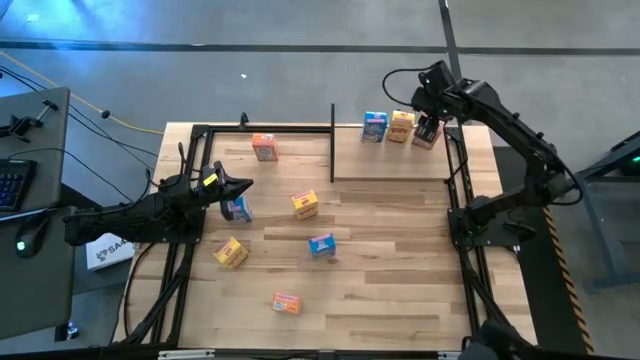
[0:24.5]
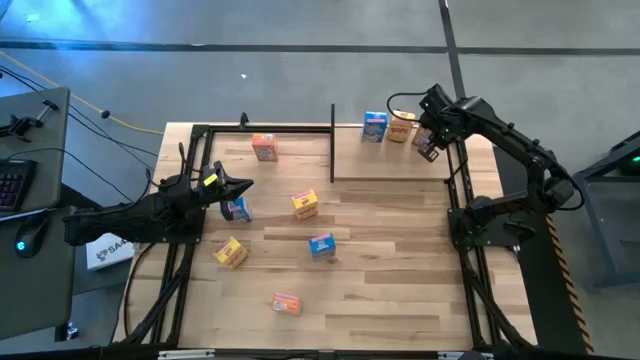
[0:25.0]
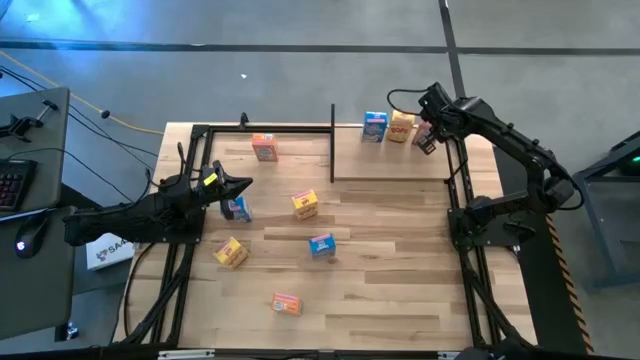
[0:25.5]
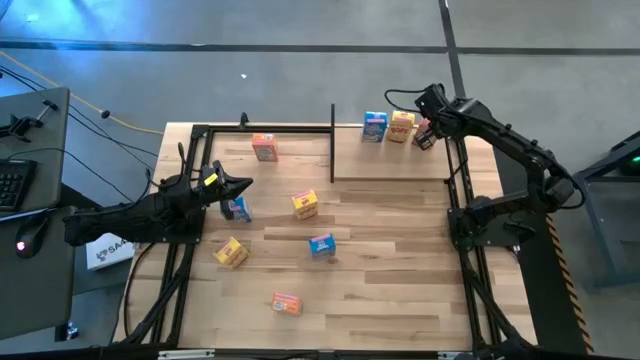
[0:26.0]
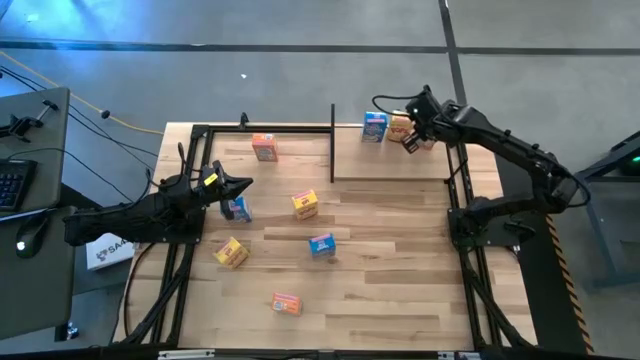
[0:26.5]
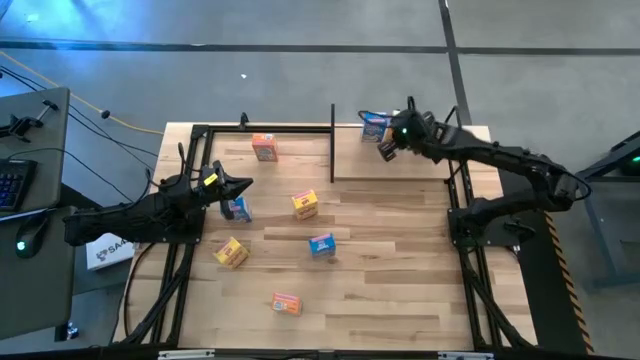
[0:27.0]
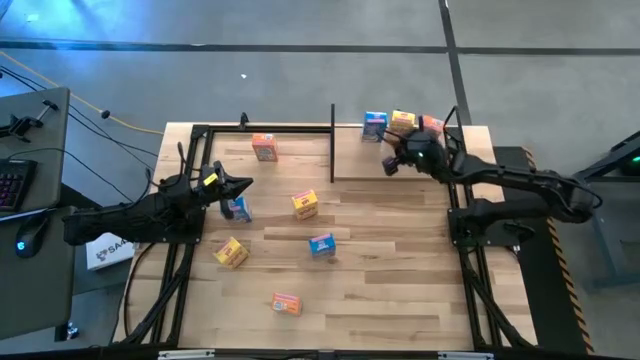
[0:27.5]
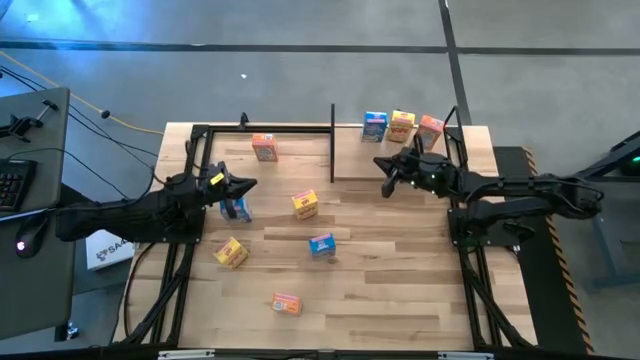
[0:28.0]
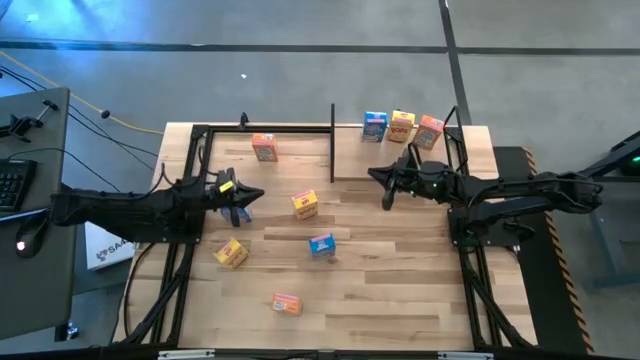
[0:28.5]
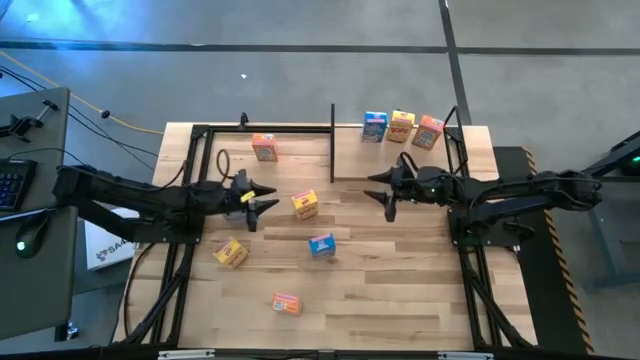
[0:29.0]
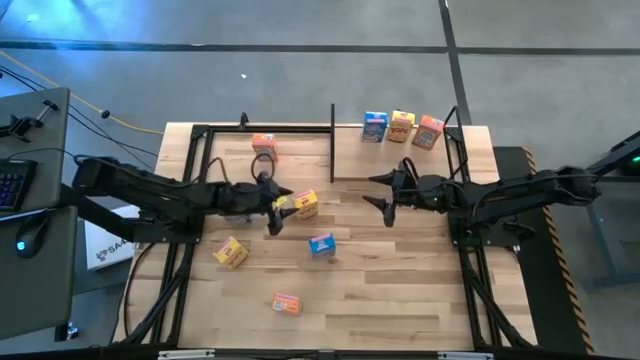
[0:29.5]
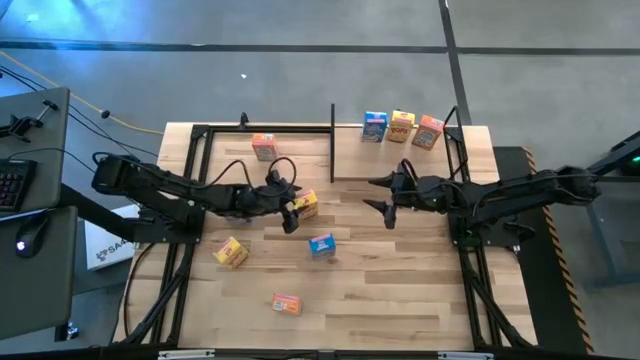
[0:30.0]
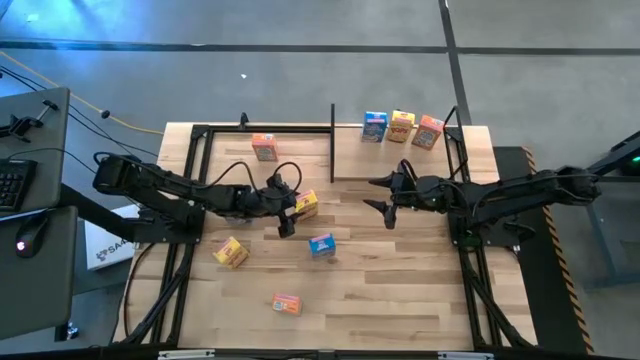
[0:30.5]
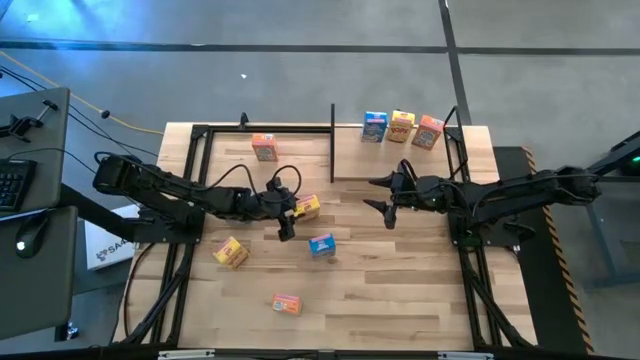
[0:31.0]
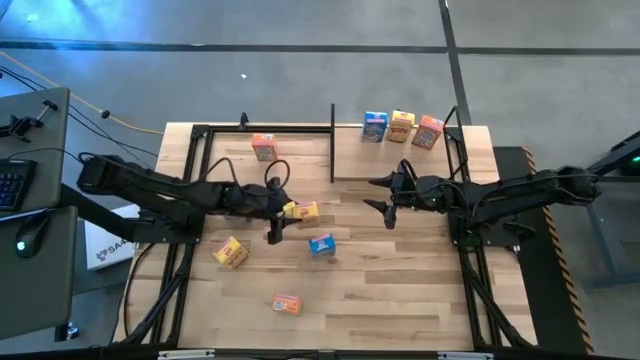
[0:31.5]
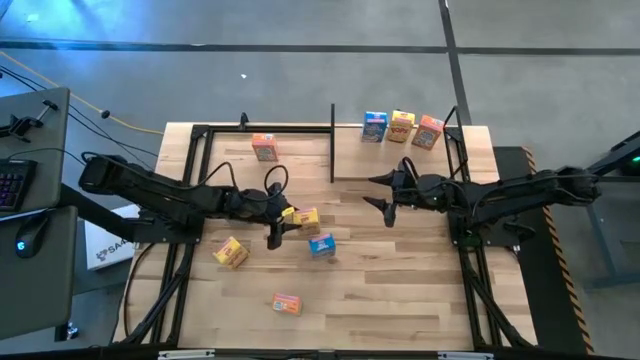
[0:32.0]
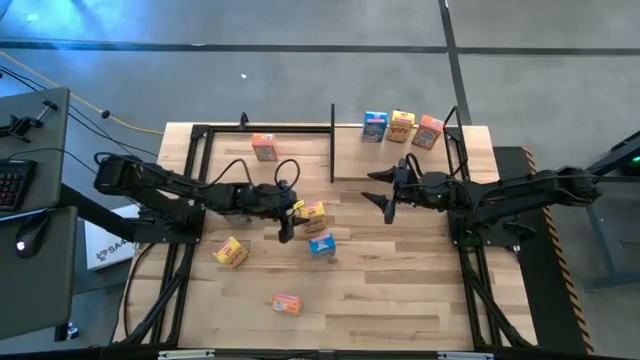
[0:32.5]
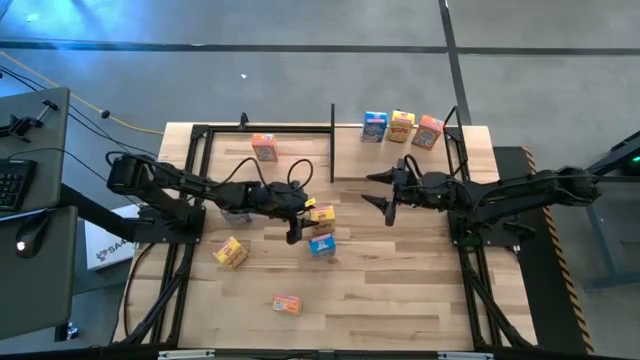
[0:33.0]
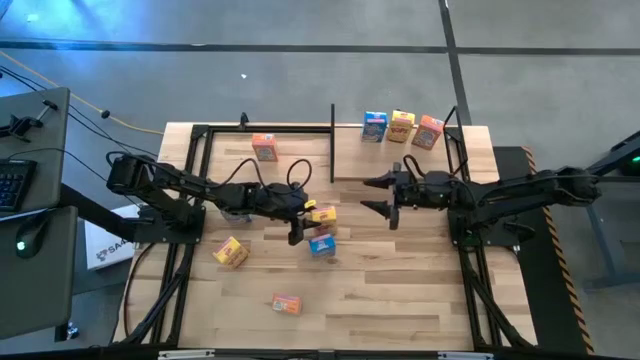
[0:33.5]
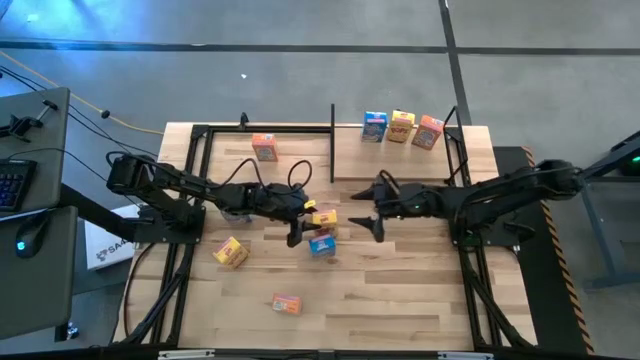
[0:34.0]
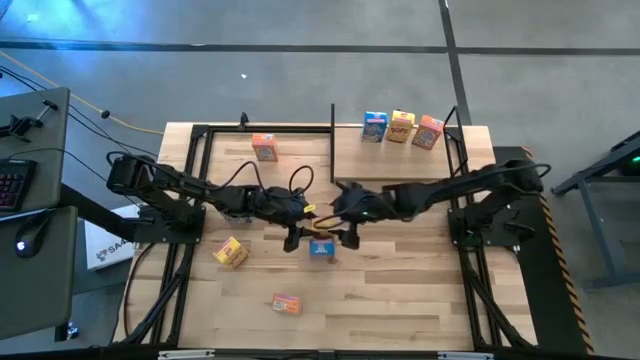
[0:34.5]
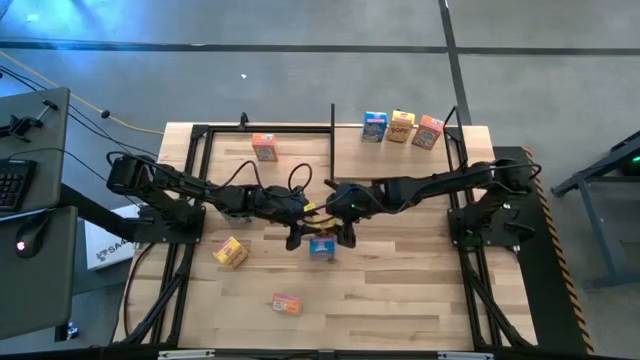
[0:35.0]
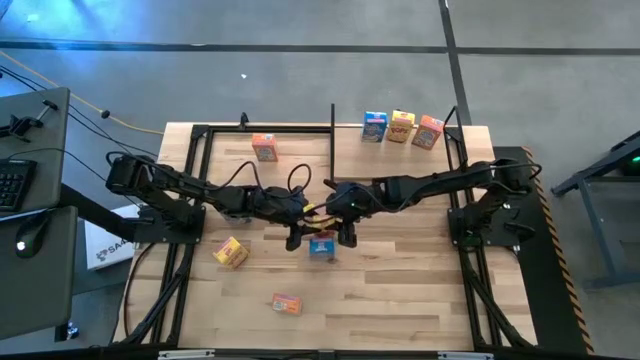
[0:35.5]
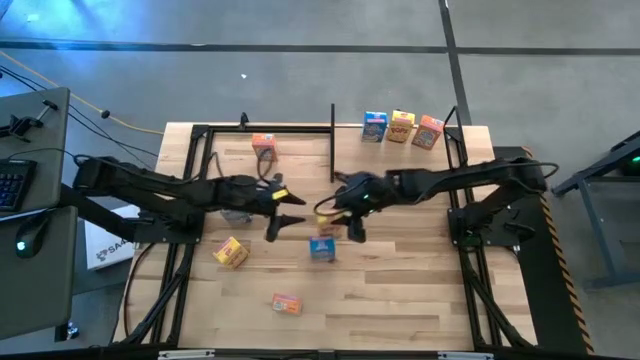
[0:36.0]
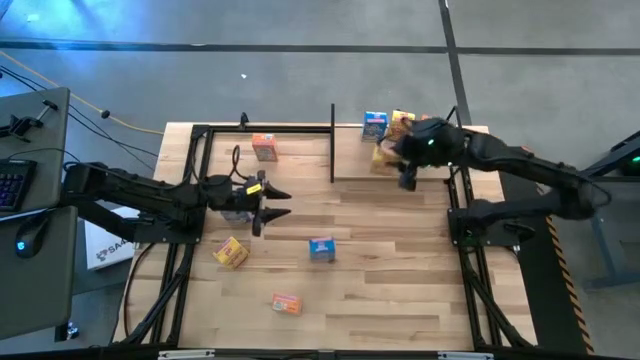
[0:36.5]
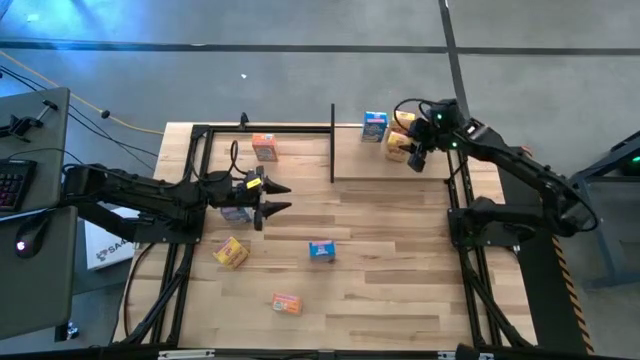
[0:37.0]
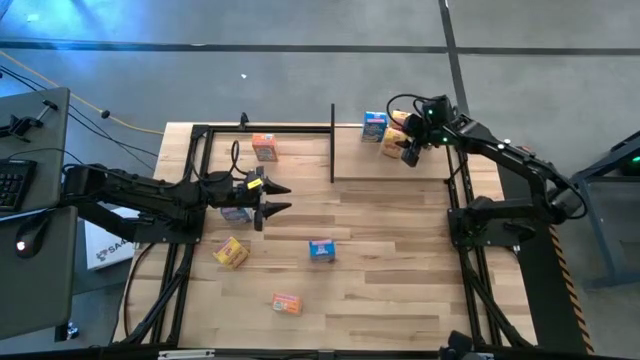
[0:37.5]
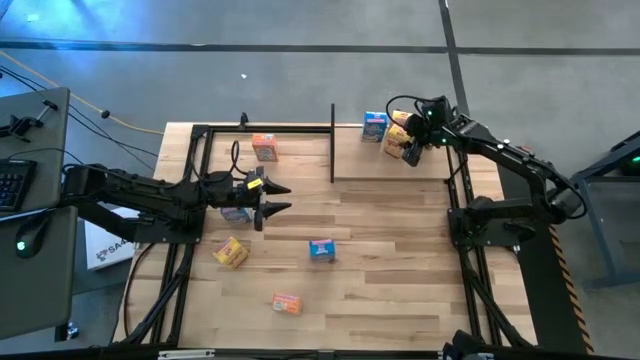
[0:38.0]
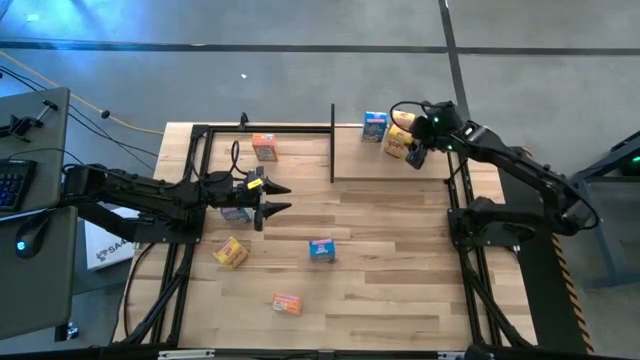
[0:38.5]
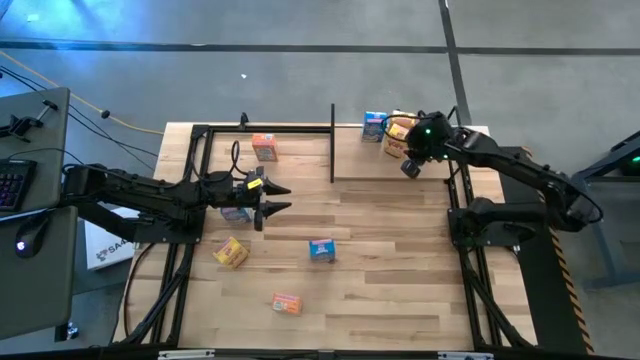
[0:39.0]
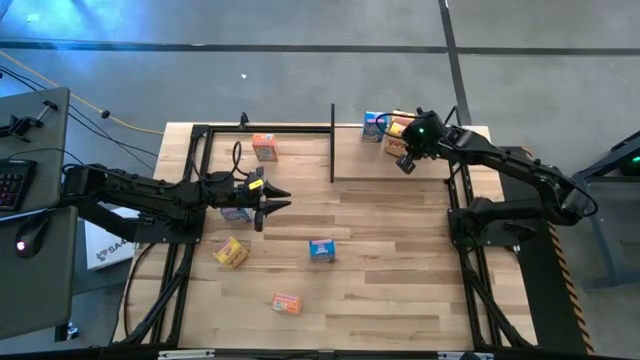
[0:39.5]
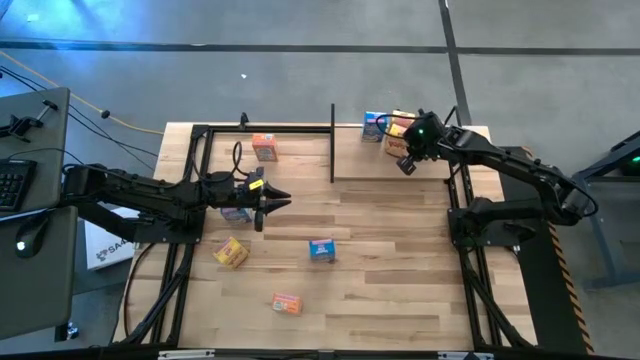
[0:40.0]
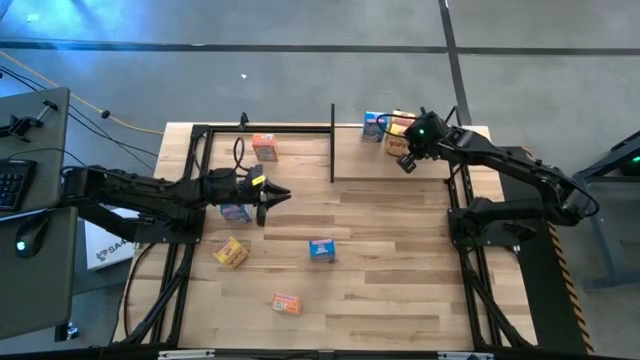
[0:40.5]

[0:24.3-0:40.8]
Task: Stack cereal on shelf
Put the top yellow cereal box on the shelf

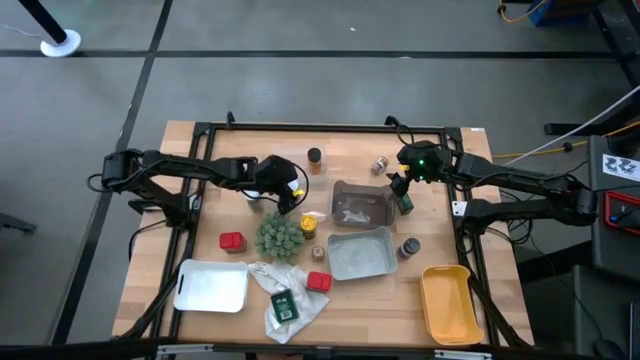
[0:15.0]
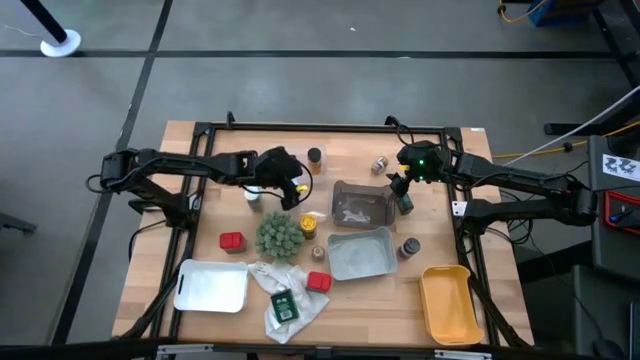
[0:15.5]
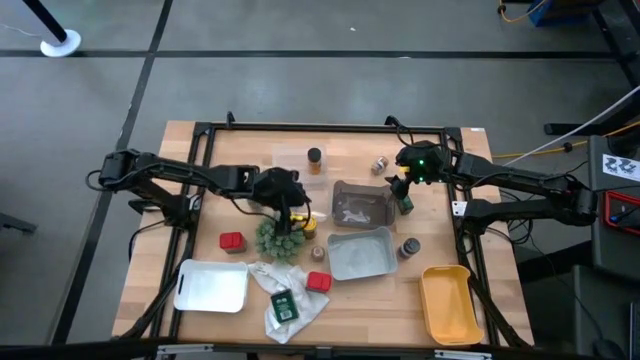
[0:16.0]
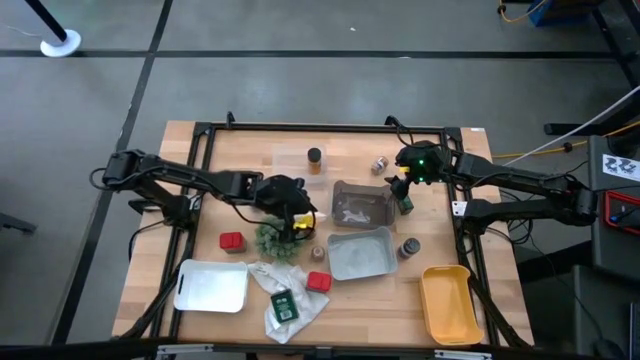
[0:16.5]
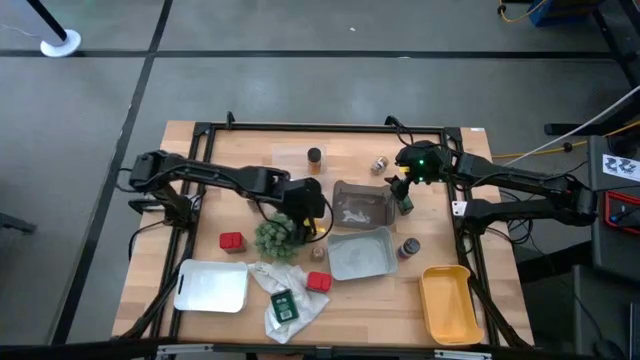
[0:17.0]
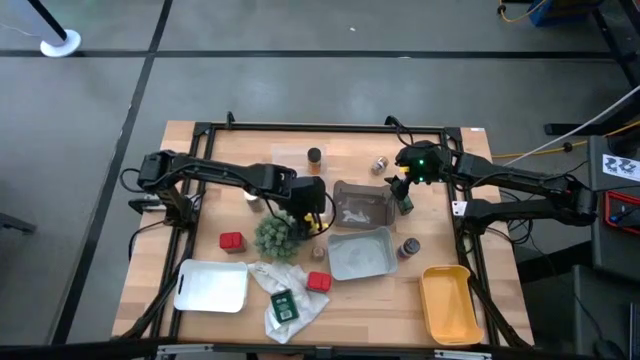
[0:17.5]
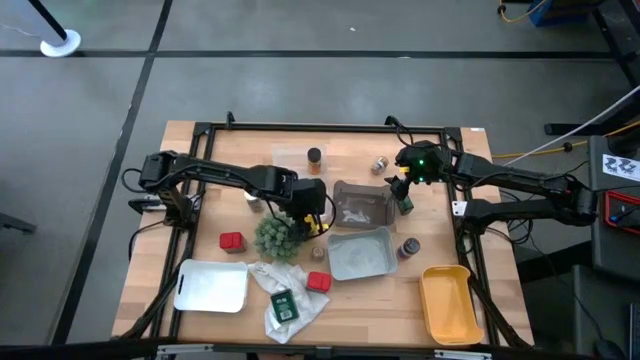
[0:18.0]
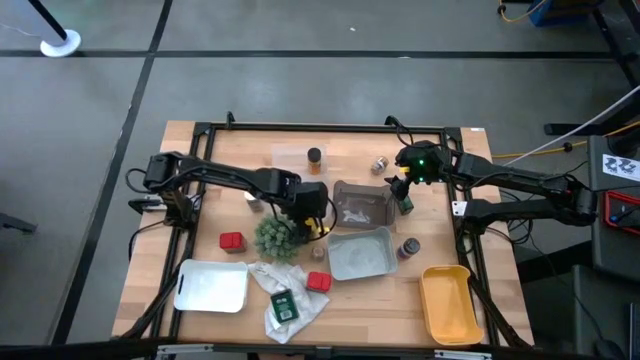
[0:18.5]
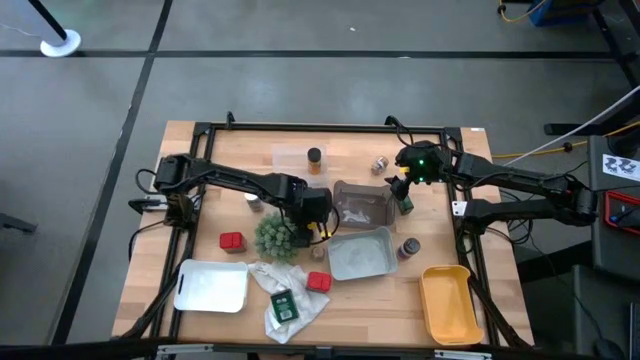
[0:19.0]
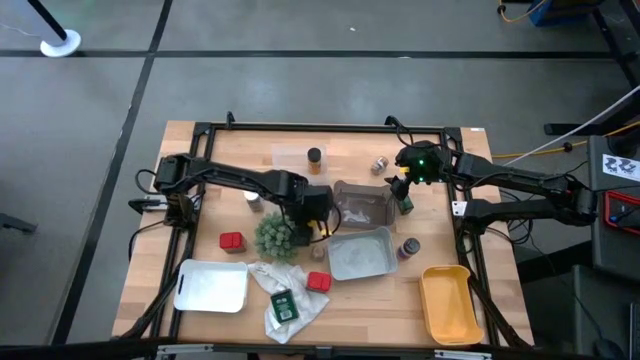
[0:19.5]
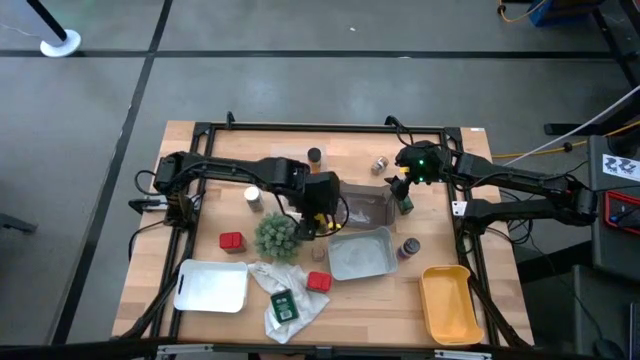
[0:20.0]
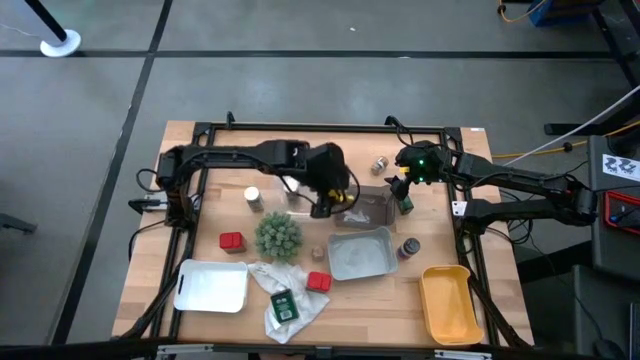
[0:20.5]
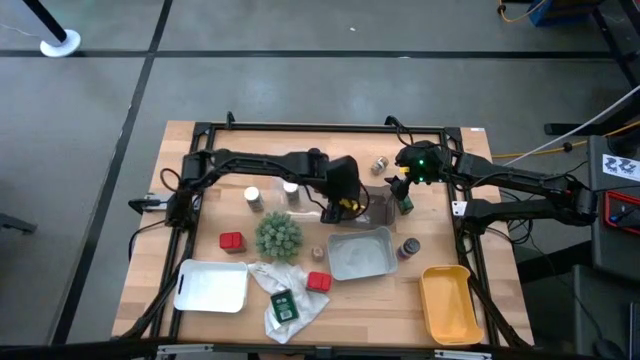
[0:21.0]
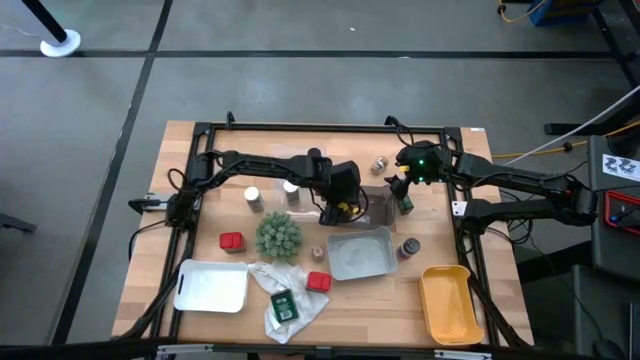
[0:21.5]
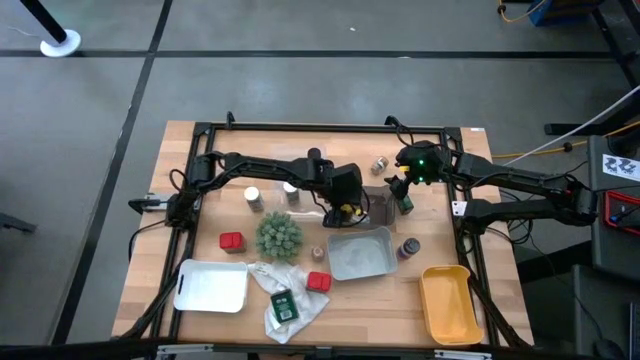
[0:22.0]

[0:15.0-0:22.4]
Task: Sort spices by type
Put the yellow seasoning bottle into the black transparent bin
